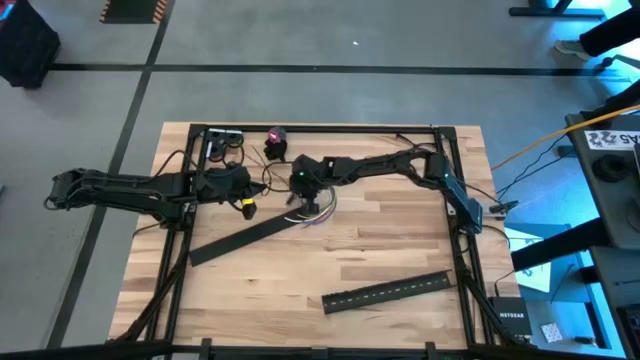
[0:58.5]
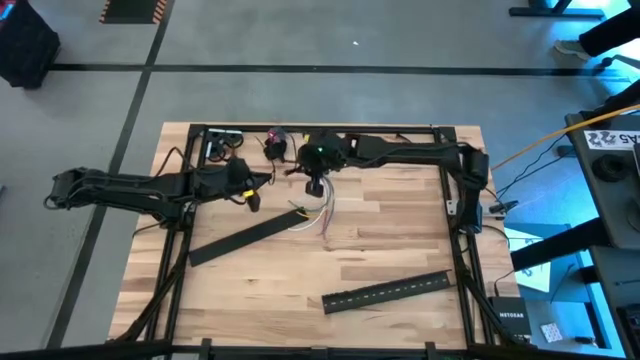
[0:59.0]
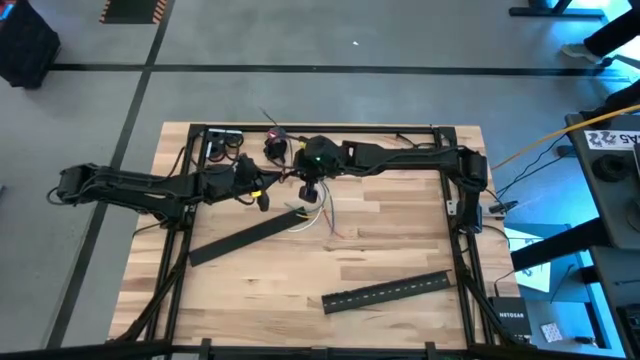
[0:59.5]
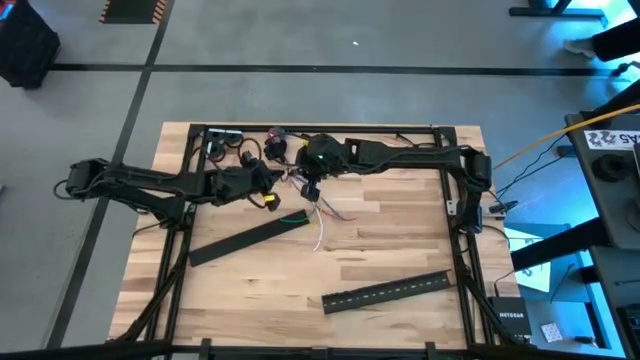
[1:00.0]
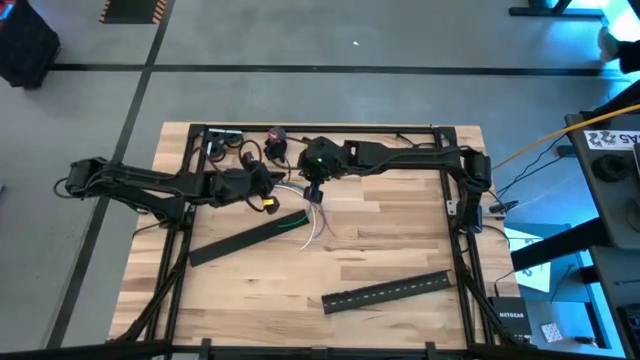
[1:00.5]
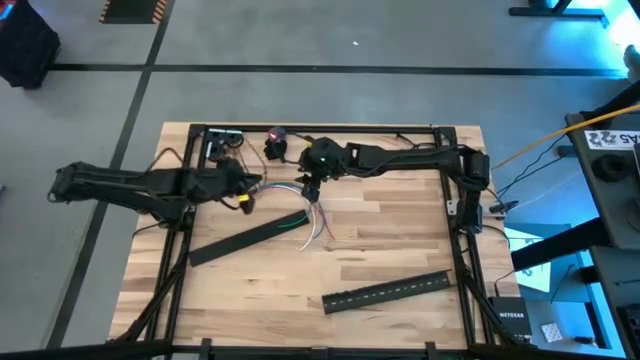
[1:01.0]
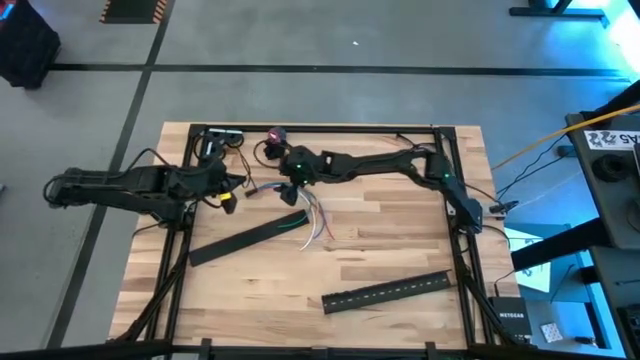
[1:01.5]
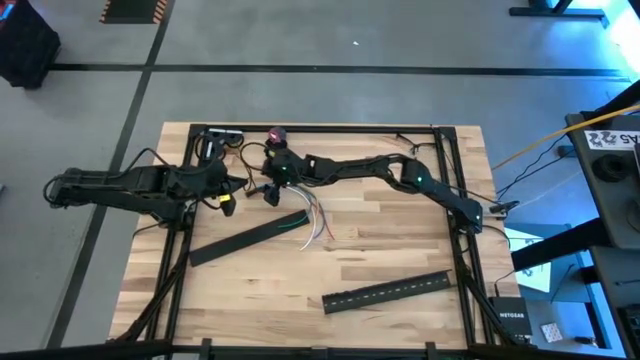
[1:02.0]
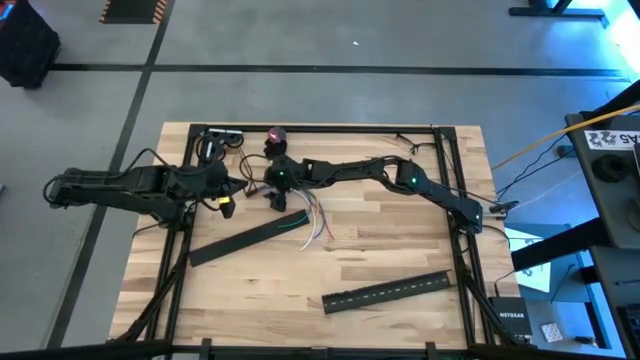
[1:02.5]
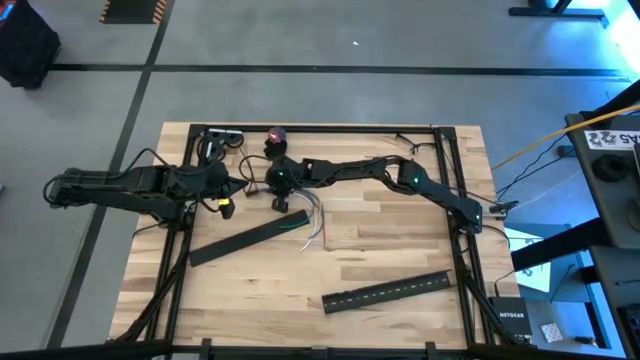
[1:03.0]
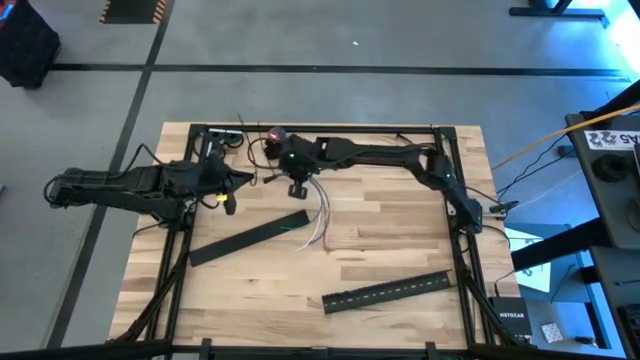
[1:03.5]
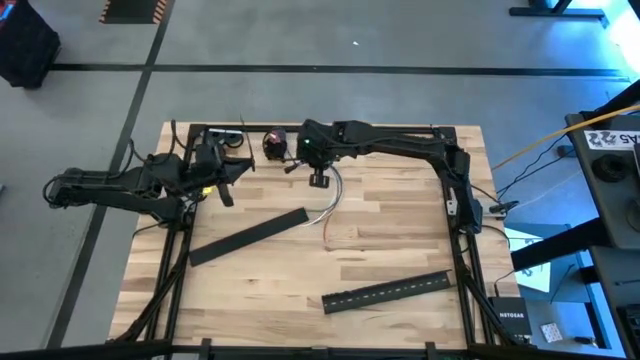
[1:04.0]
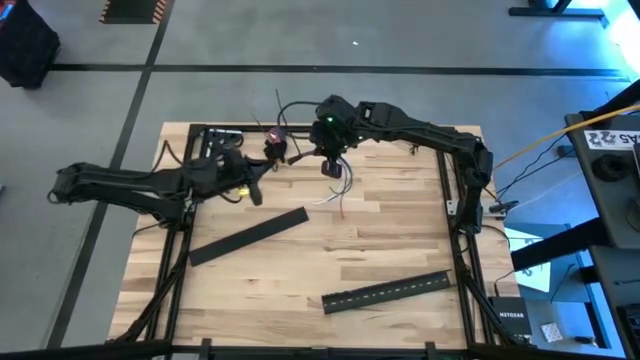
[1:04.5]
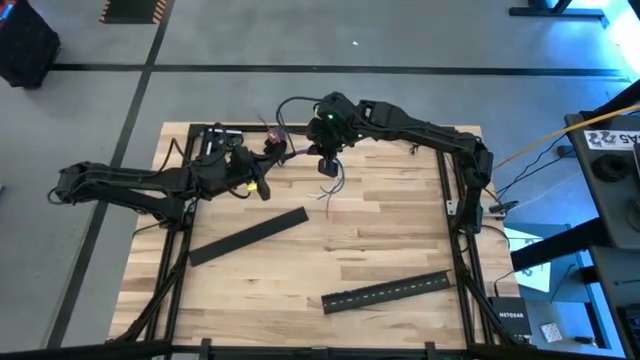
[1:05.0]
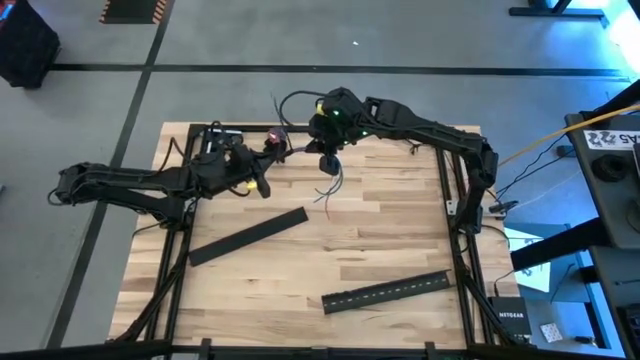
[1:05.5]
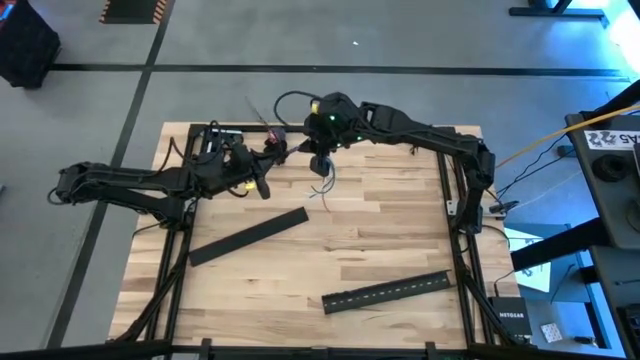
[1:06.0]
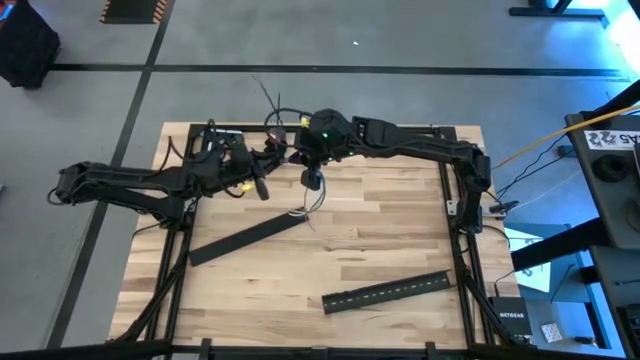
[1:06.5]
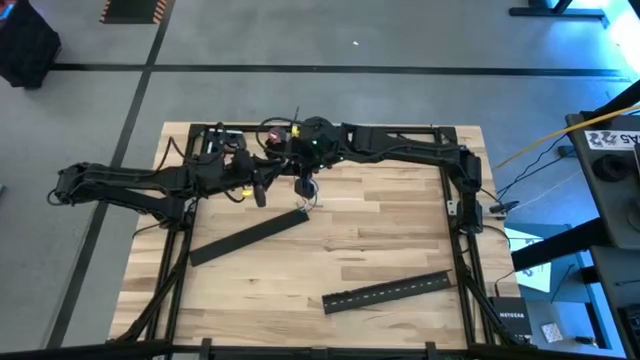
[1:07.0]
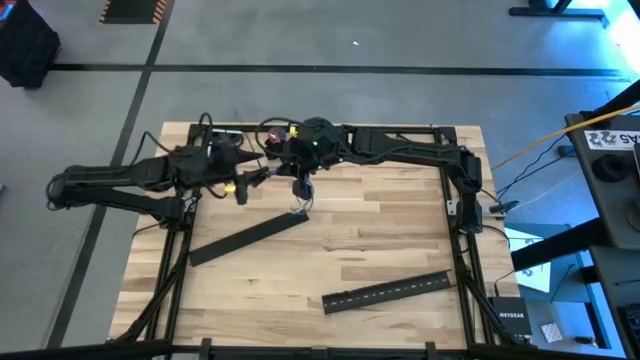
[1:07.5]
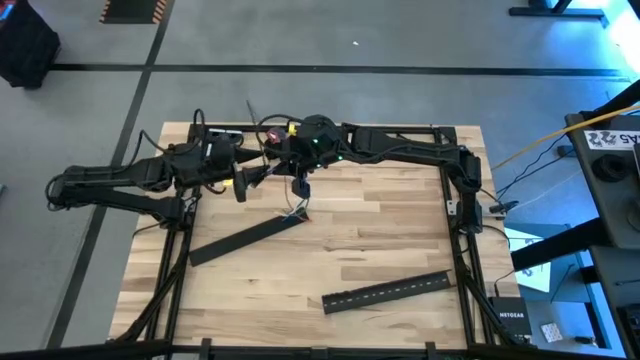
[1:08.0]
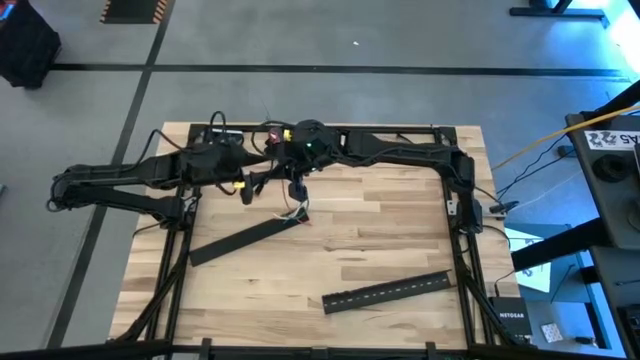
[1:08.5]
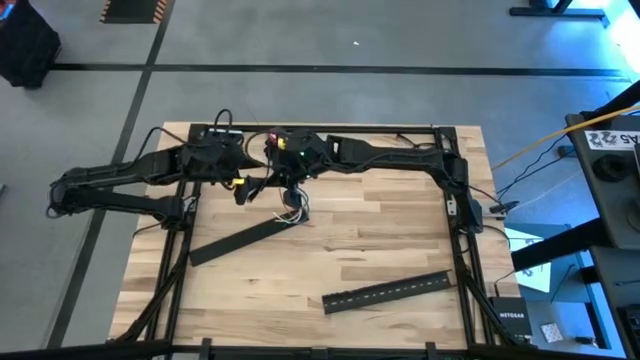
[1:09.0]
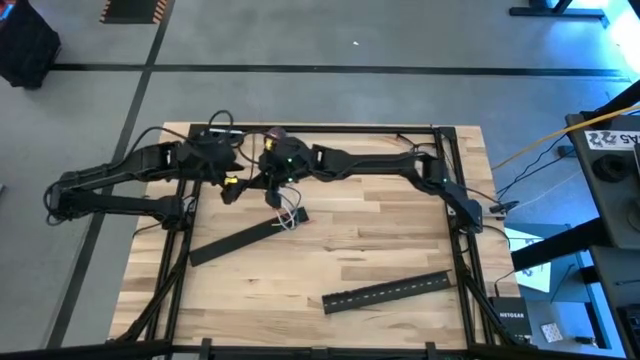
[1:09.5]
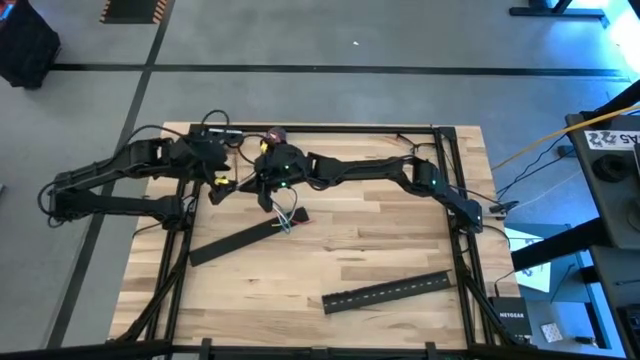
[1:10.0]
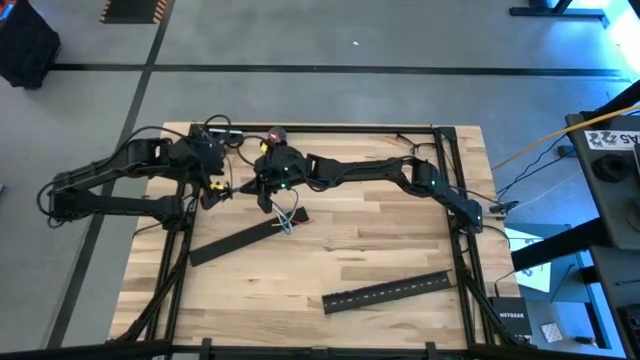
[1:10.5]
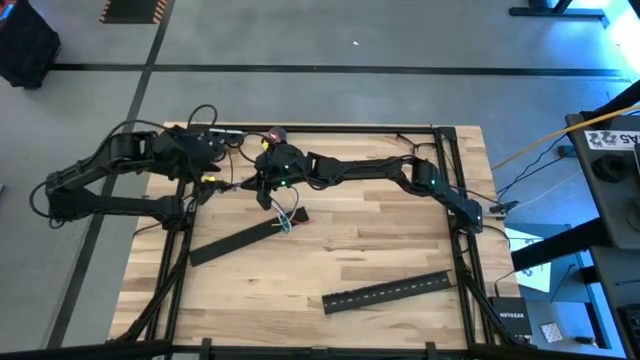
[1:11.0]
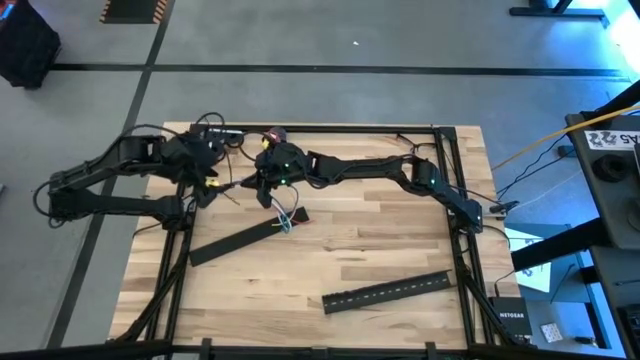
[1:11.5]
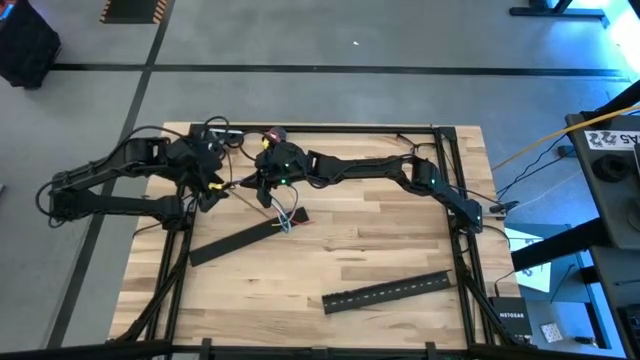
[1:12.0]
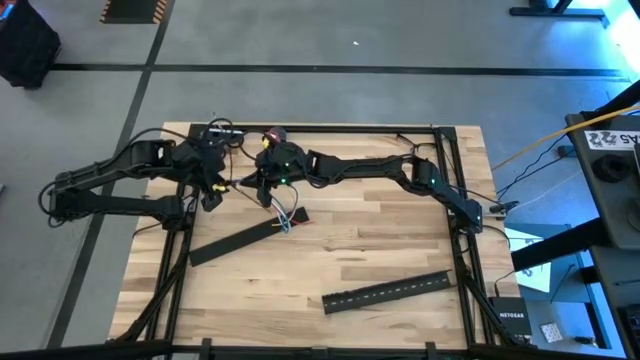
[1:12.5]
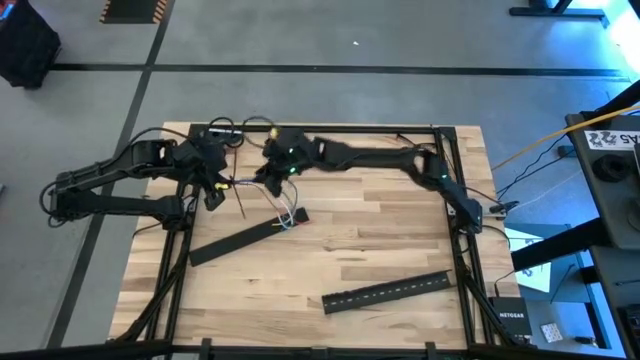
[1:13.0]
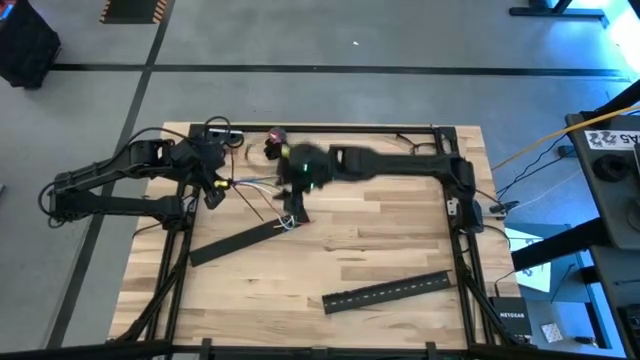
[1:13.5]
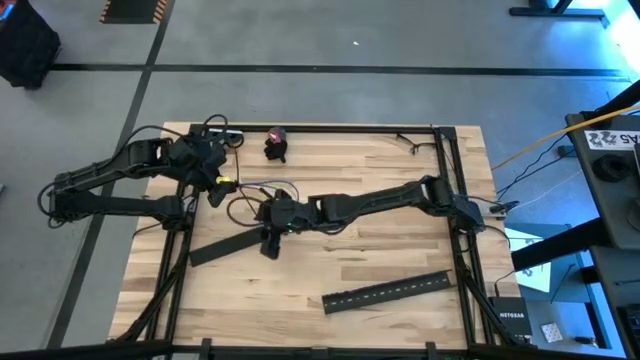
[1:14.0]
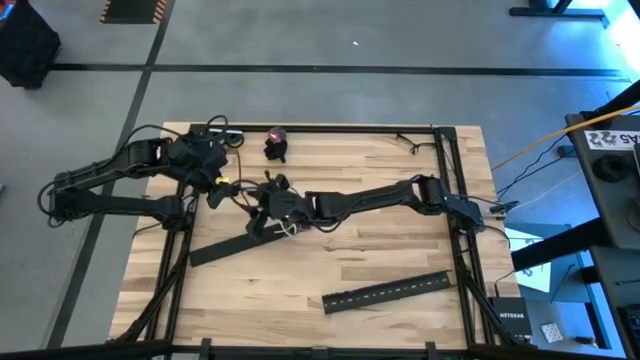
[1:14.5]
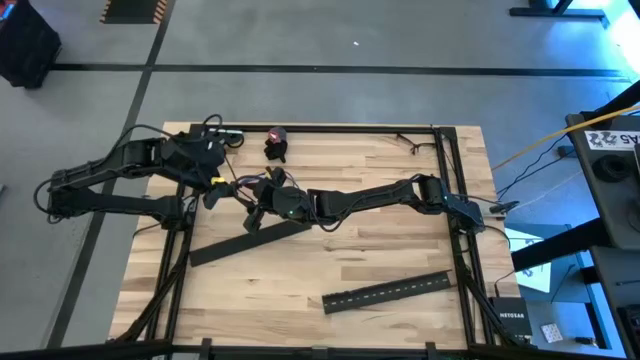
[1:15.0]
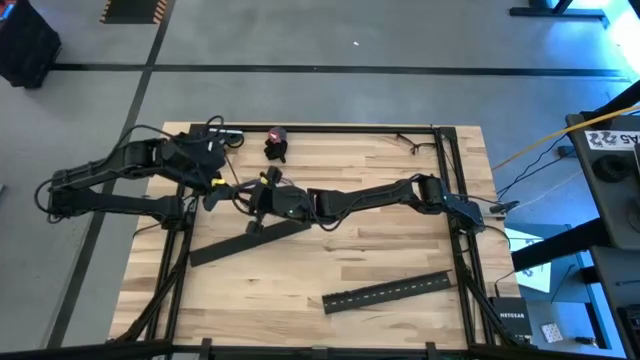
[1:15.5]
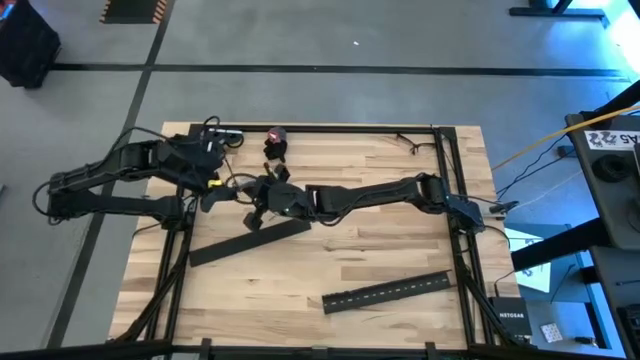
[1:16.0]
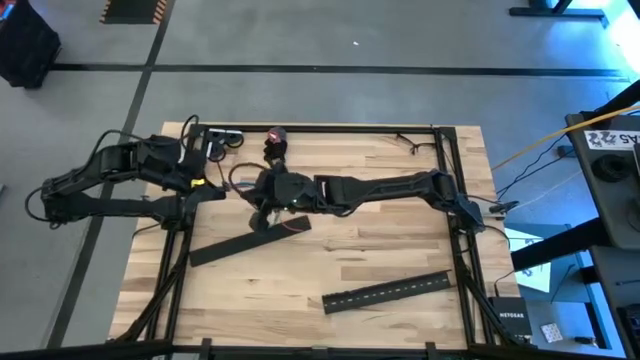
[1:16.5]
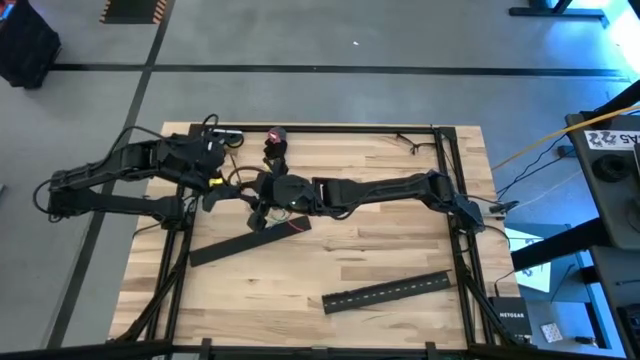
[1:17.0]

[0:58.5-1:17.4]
Task: Ziptie cables
Wrap the cable wires with the black zip tie
